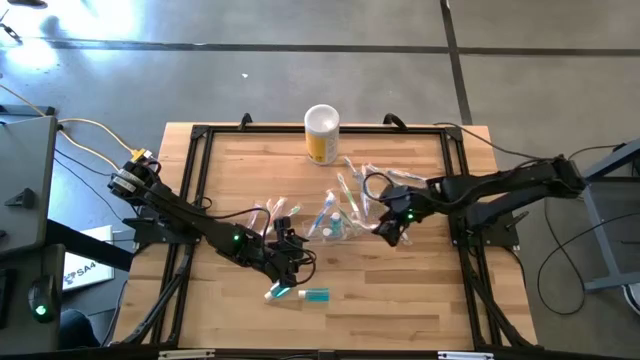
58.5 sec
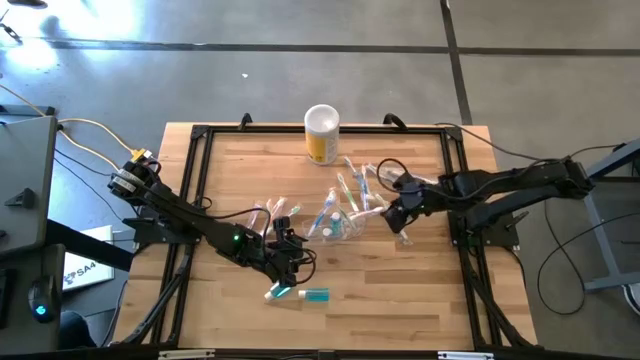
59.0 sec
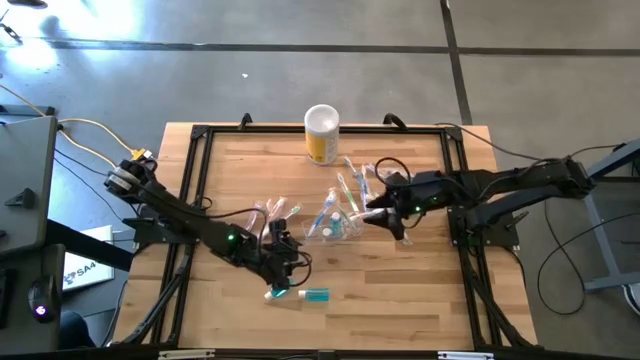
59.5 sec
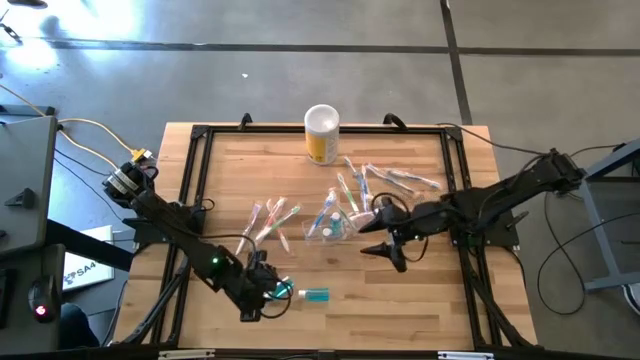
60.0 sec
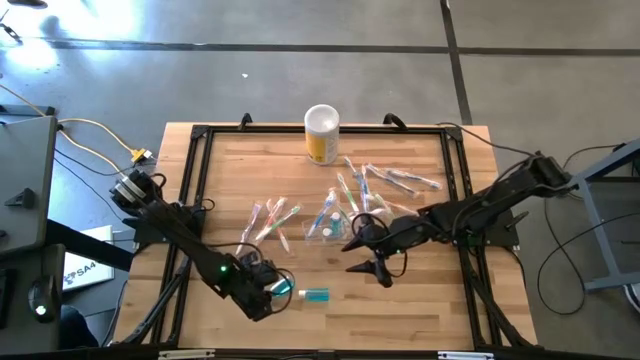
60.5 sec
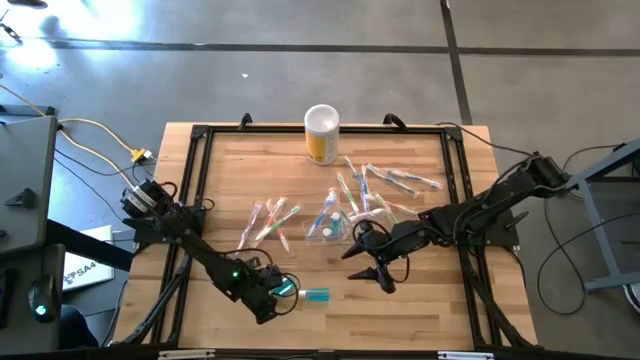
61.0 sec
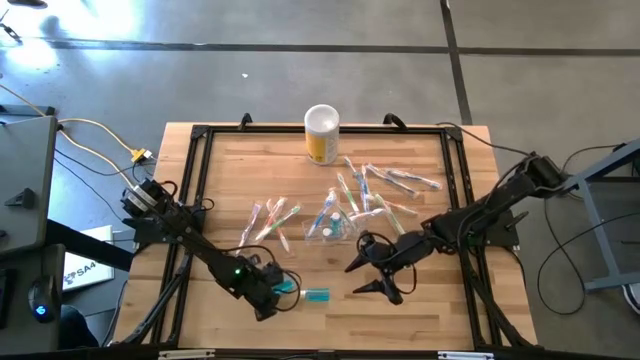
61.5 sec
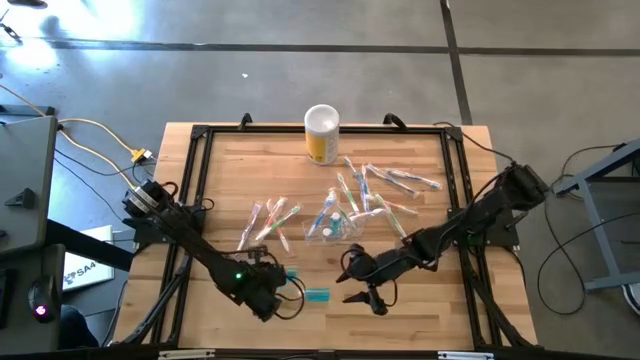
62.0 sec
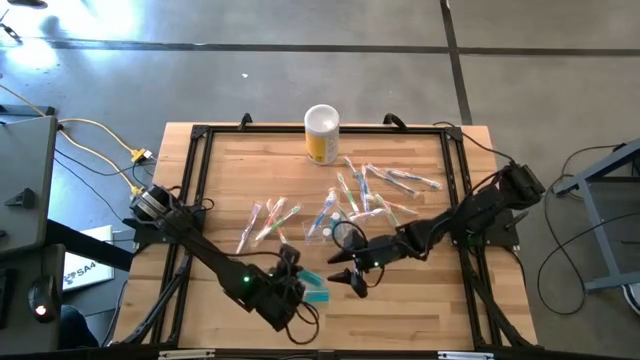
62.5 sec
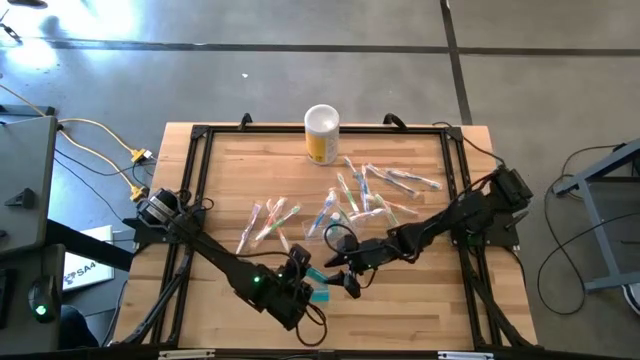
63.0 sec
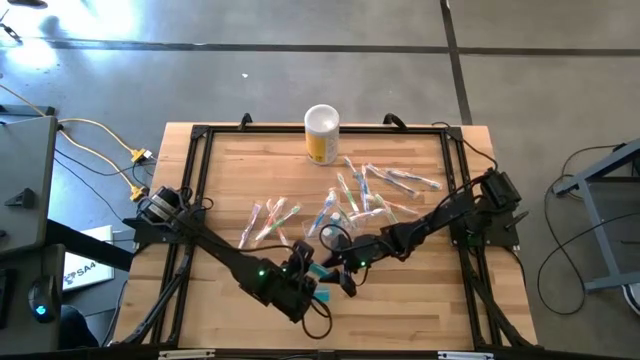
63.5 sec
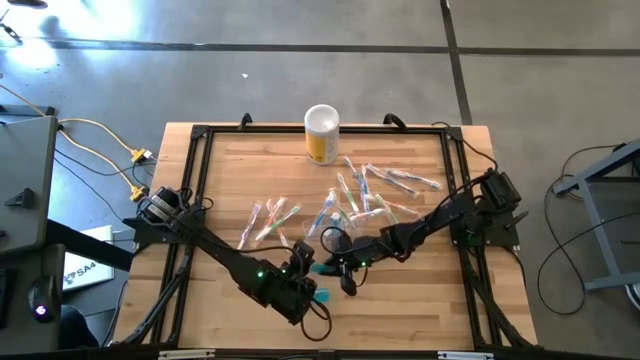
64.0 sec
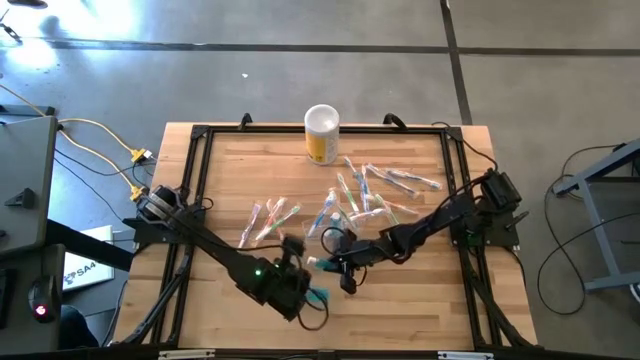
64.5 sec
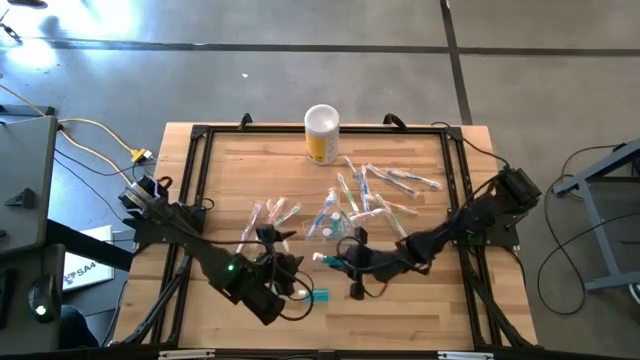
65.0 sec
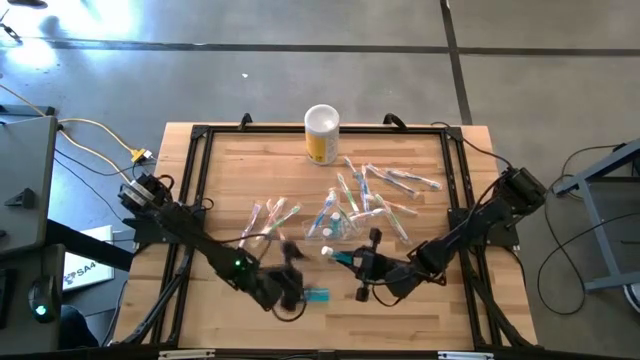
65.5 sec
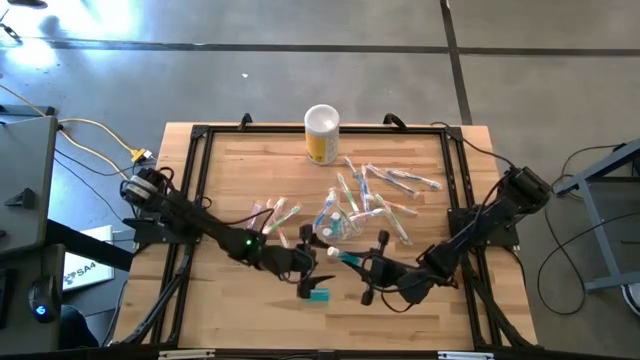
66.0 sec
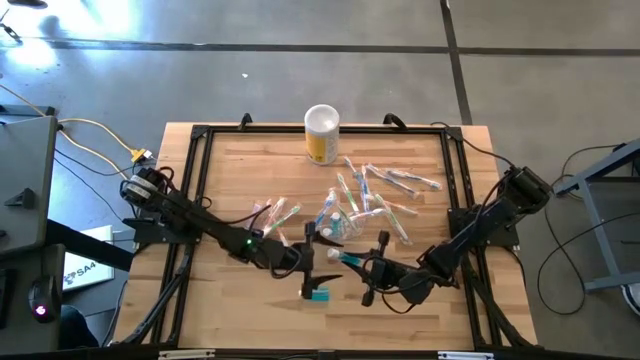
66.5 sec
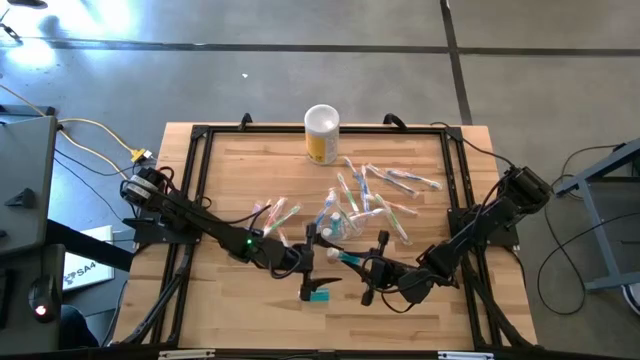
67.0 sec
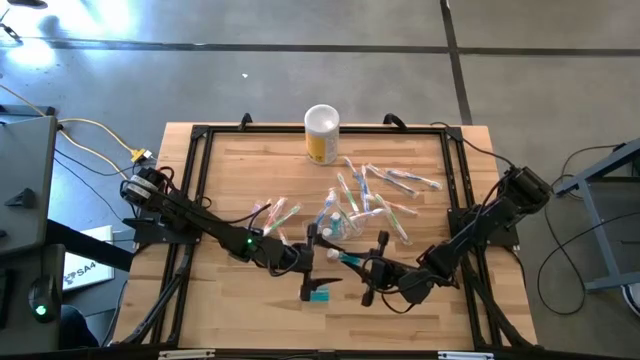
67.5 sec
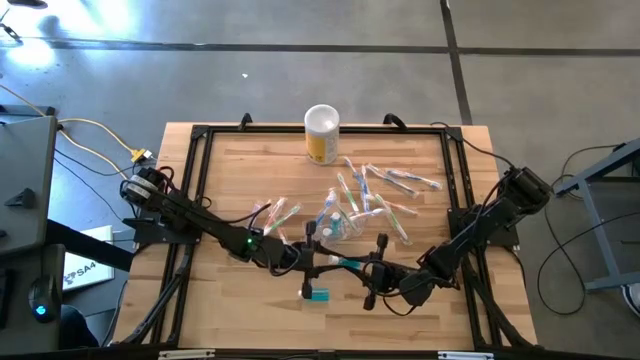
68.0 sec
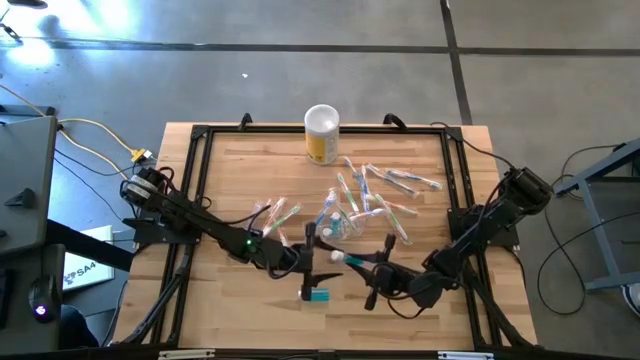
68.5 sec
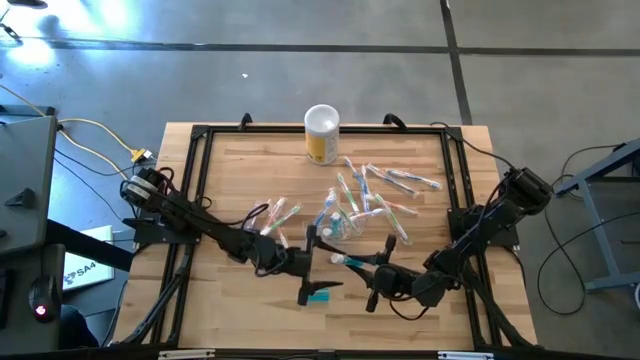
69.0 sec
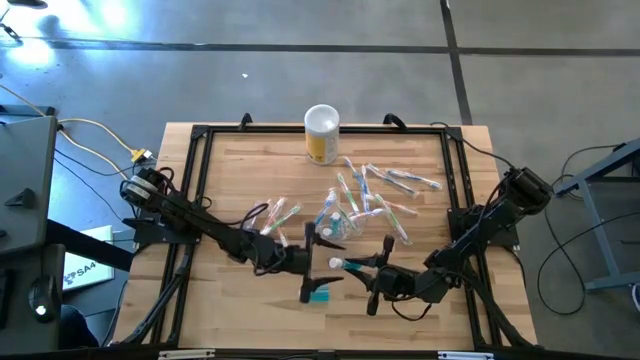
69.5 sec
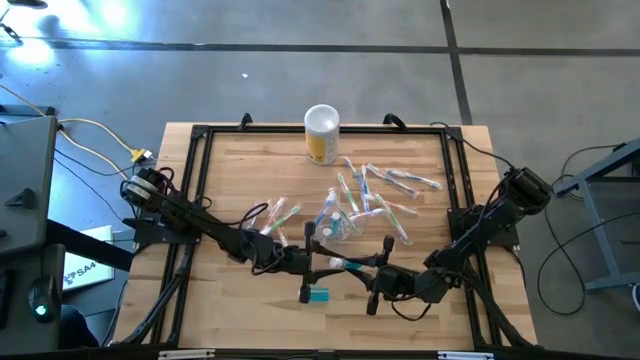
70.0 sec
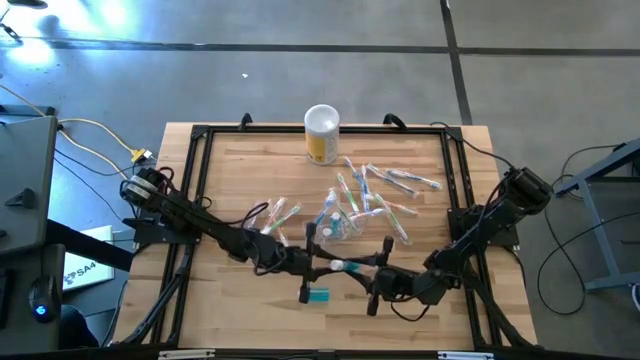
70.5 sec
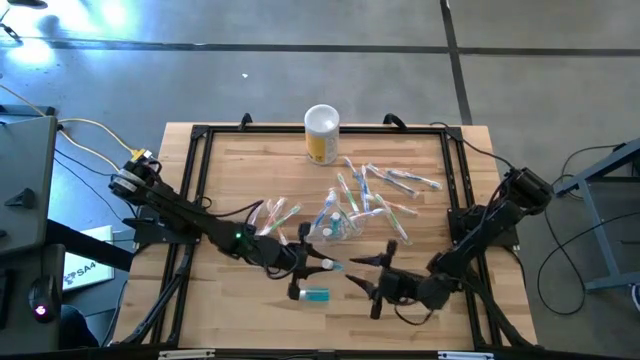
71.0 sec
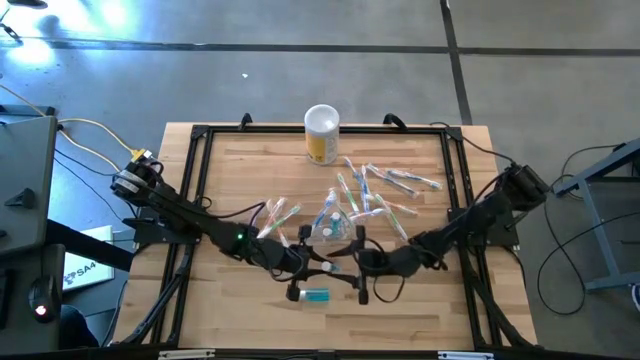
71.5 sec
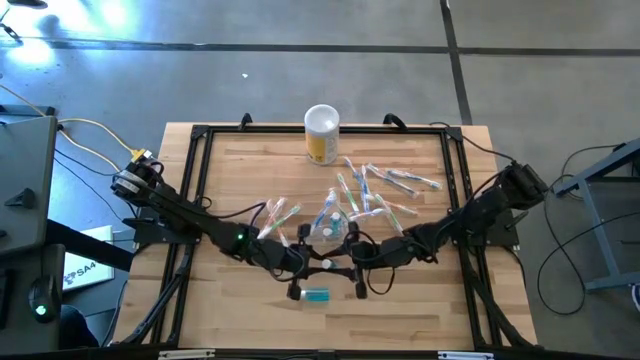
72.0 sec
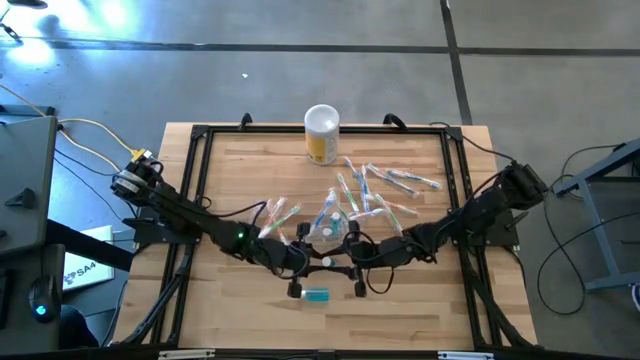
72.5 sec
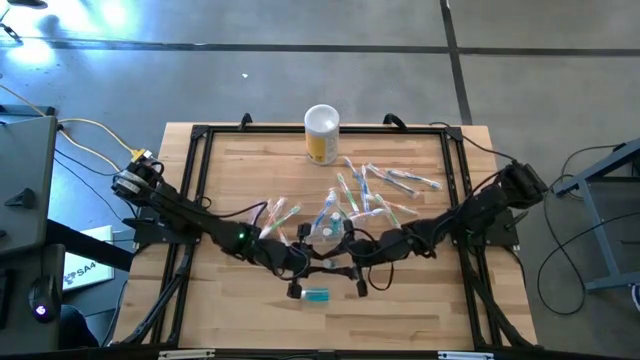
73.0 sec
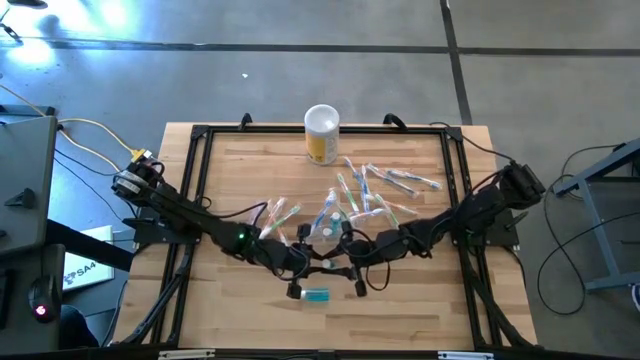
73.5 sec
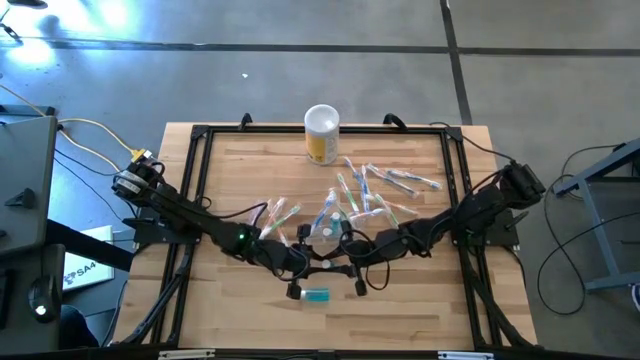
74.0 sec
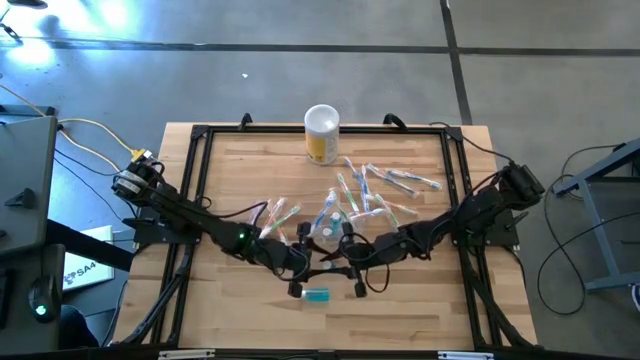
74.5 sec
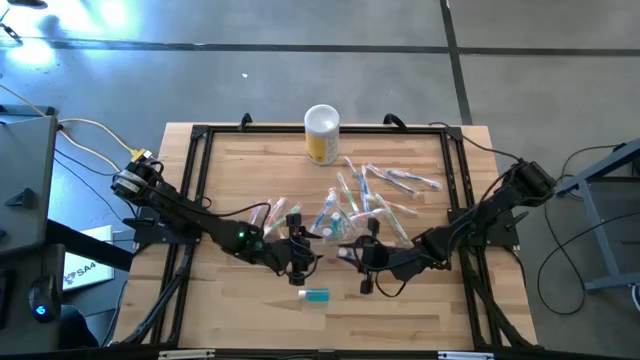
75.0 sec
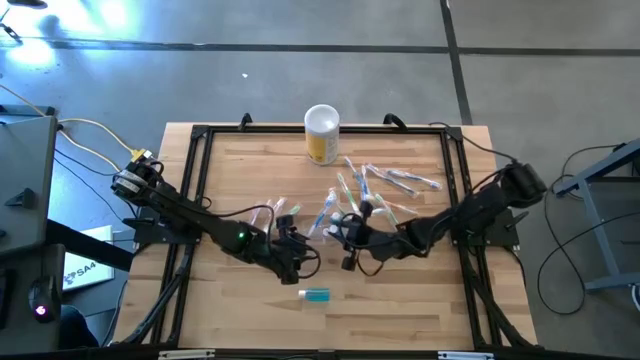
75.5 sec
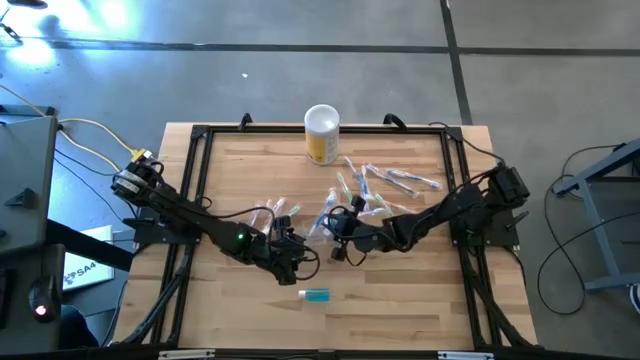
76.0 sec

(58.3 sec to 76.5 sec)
Task: Pick & Place toothbrushing station
Put the blue mouthwash in the transparent organizer

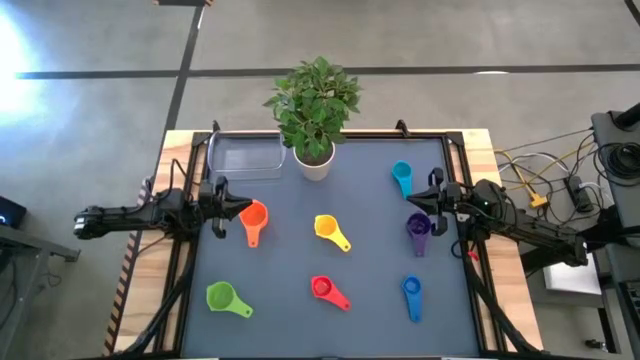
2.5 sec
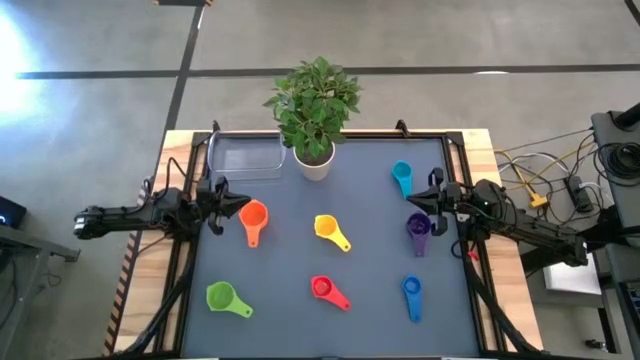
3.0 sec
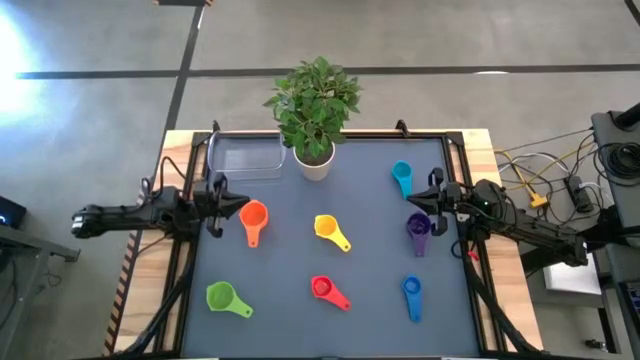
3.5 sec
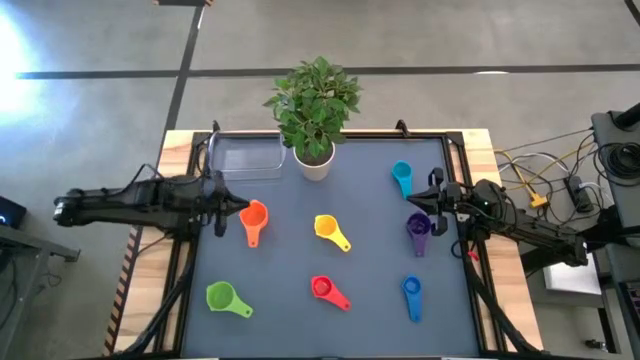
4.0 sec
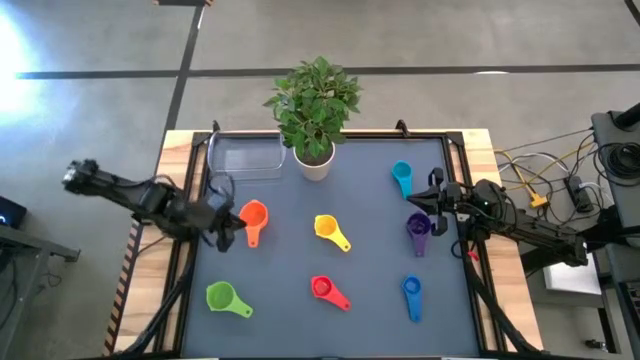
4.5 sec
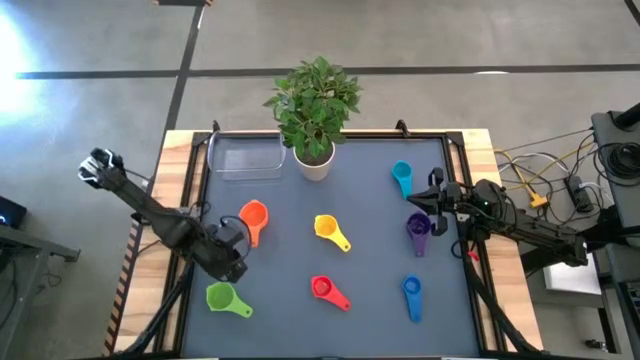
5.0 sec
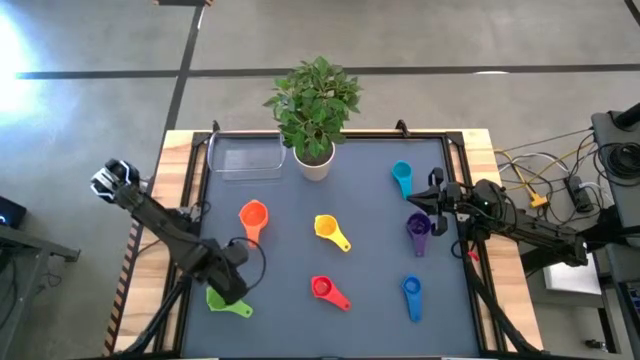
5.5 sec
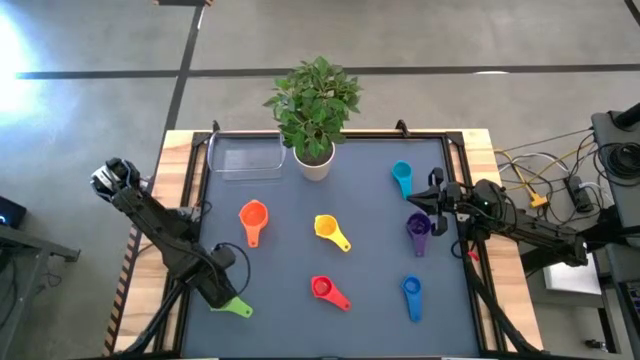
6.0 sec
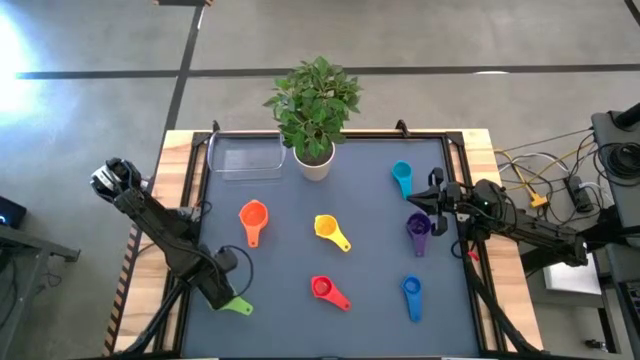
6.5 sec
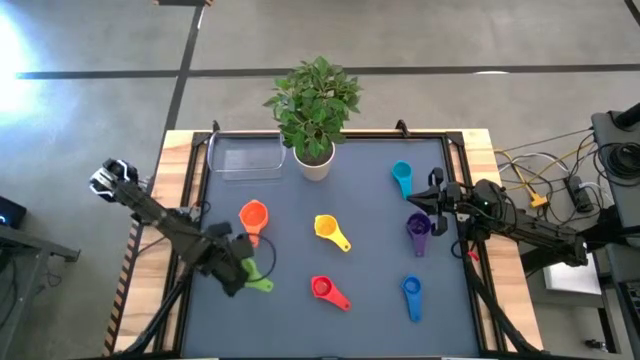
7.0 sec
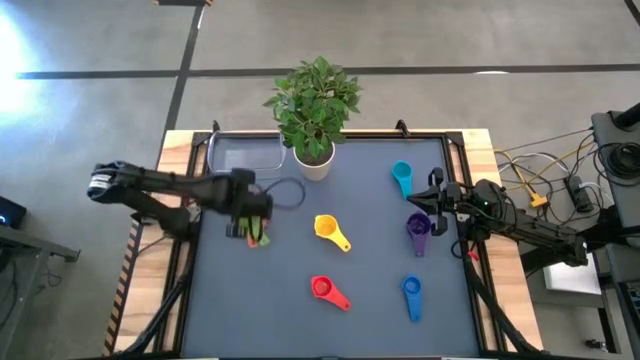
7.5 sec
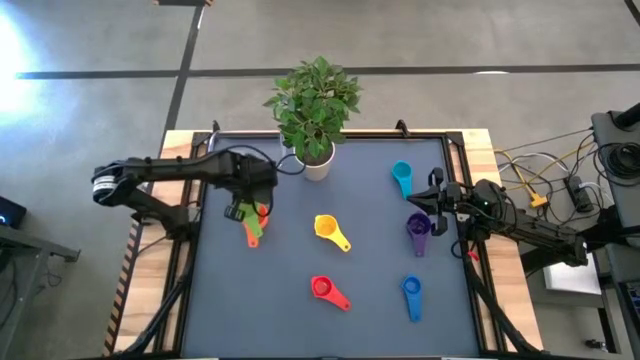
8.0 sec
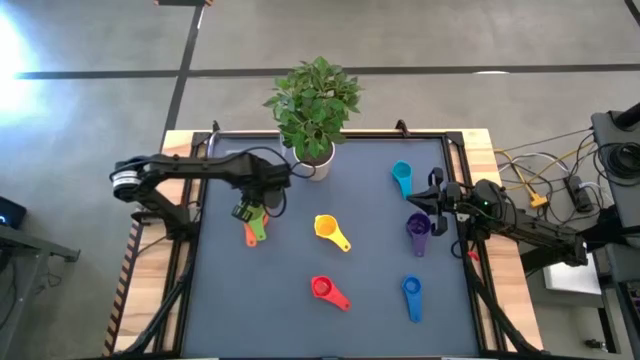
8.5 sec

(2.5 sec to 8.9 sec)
Task: Nest measuring cups in basket
Stack the green measuring cup on top of the orange measuring cup
